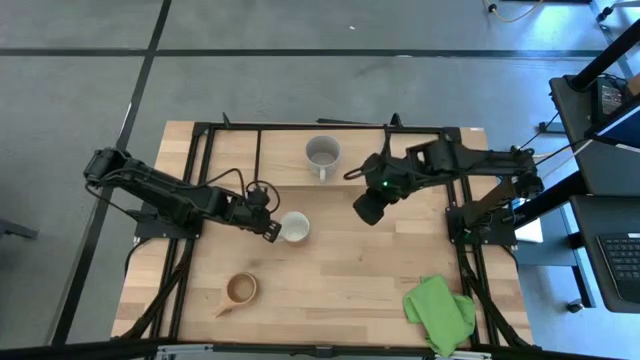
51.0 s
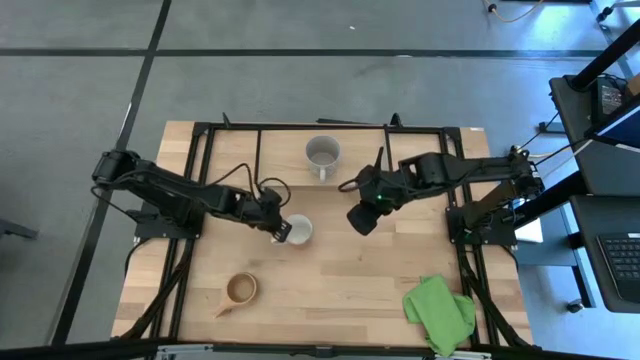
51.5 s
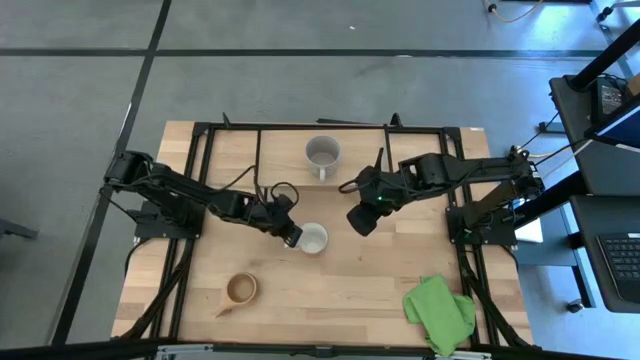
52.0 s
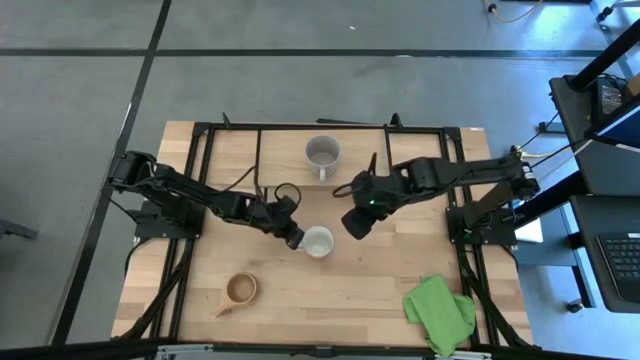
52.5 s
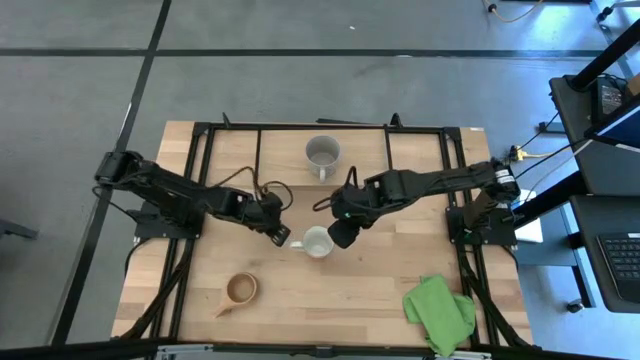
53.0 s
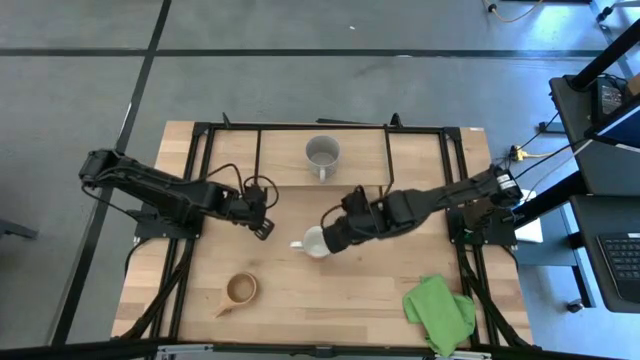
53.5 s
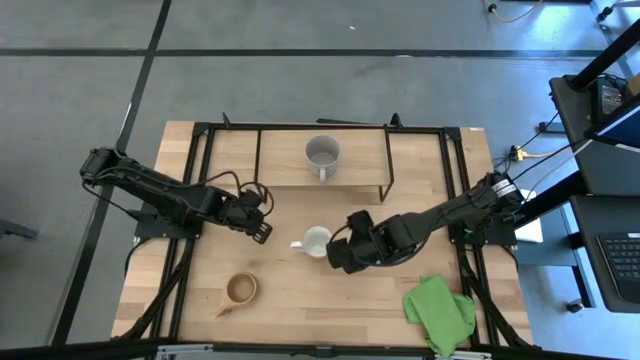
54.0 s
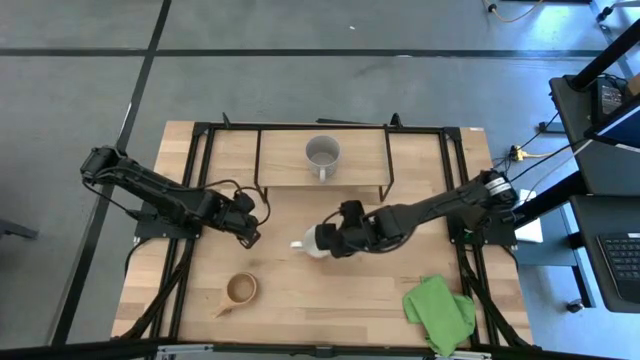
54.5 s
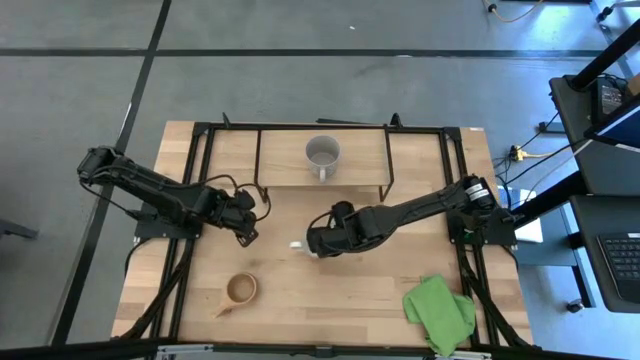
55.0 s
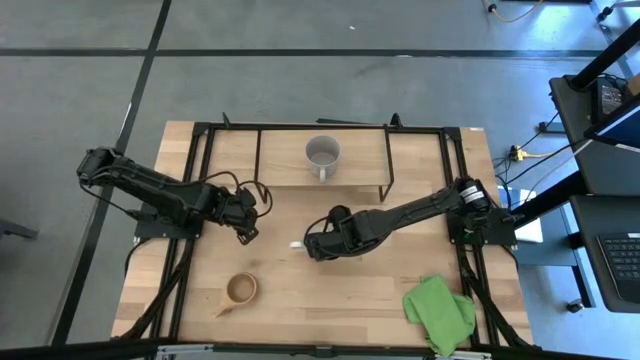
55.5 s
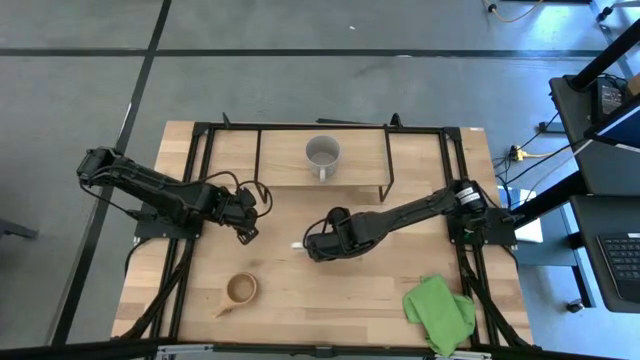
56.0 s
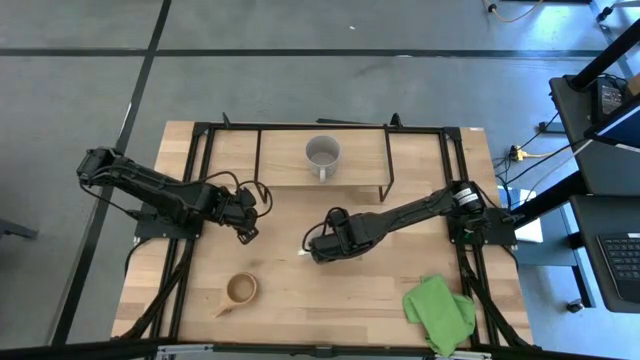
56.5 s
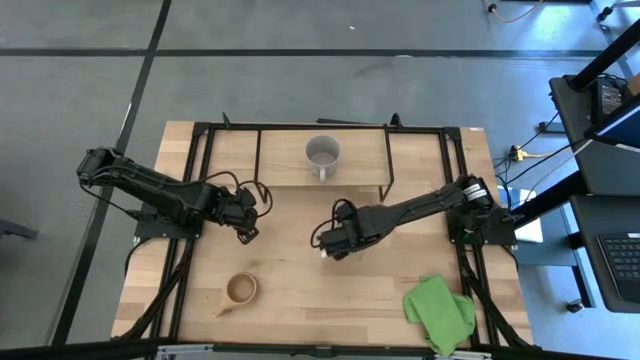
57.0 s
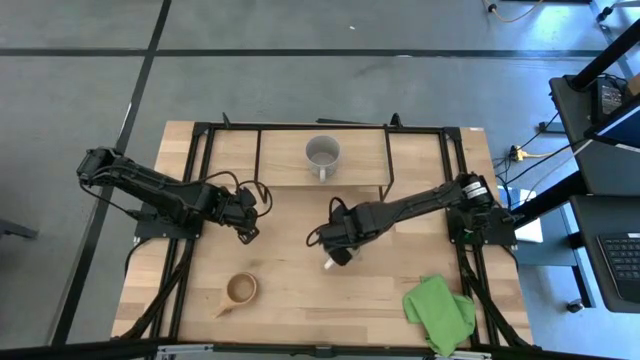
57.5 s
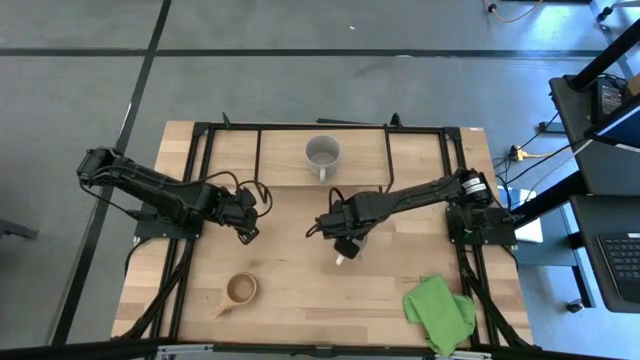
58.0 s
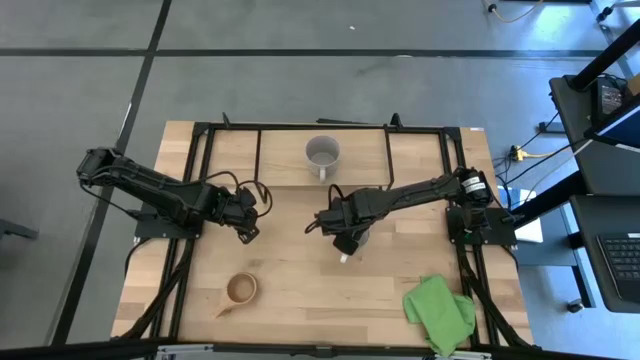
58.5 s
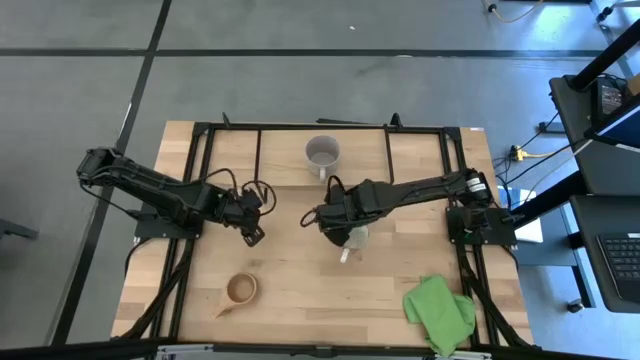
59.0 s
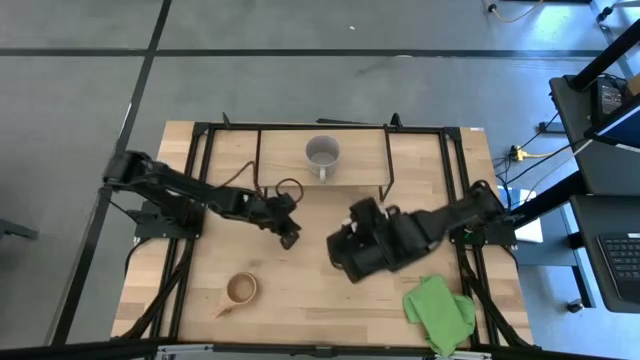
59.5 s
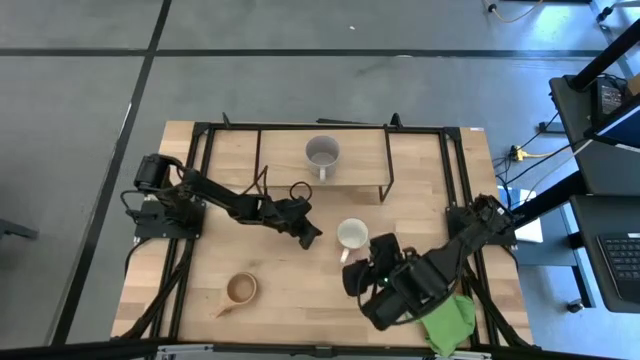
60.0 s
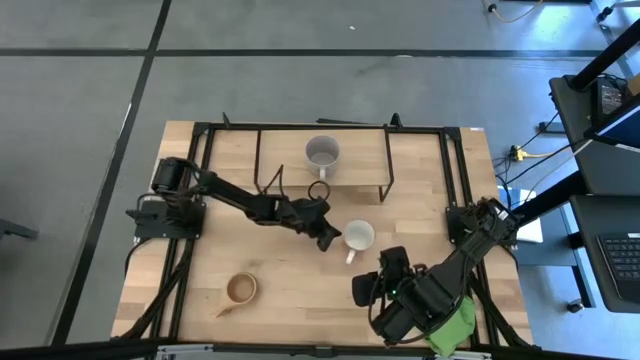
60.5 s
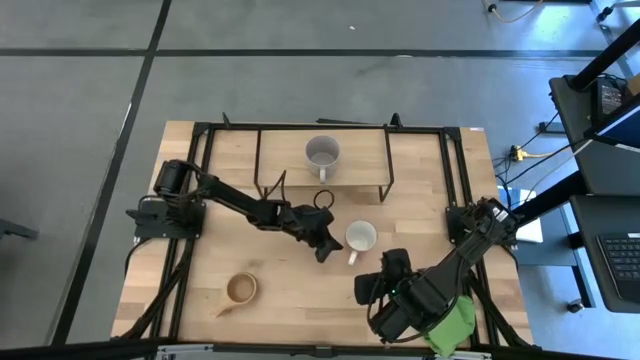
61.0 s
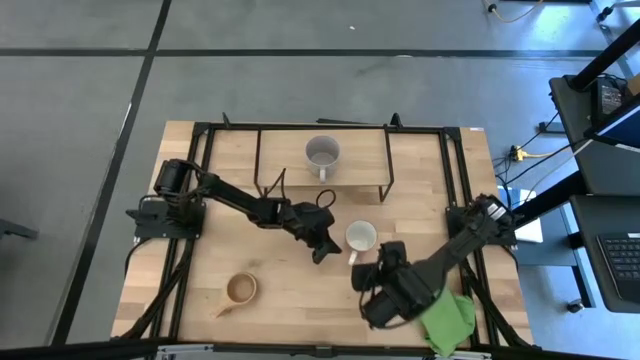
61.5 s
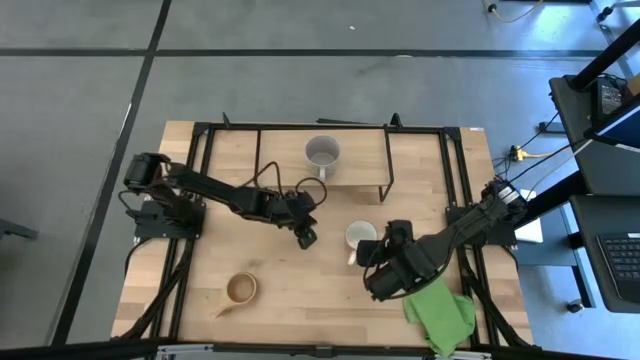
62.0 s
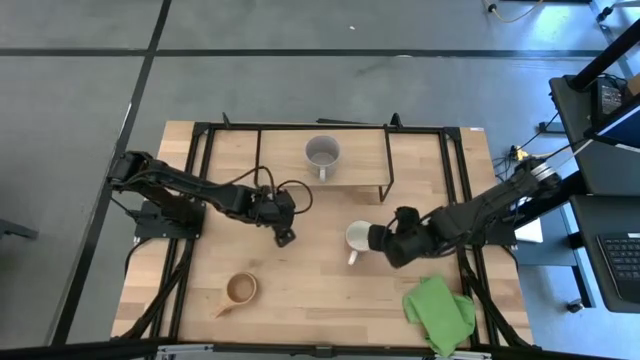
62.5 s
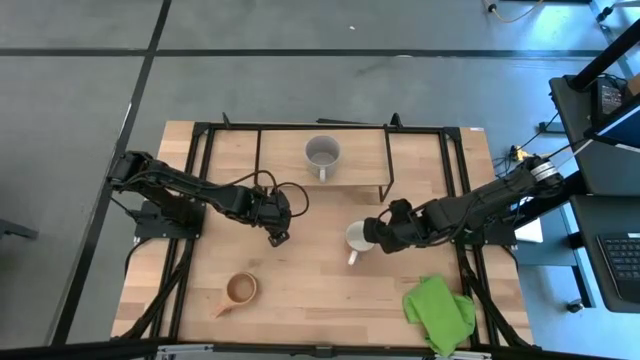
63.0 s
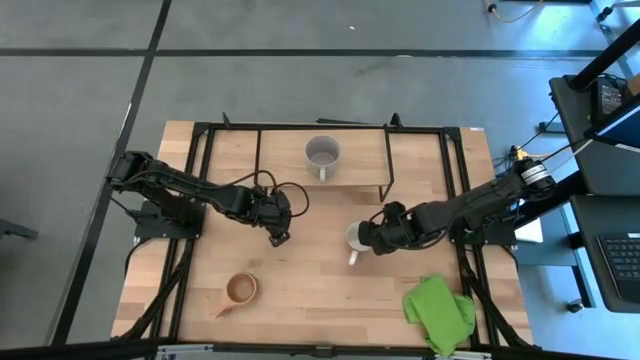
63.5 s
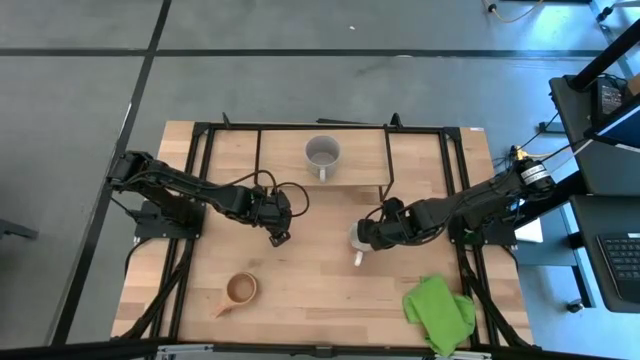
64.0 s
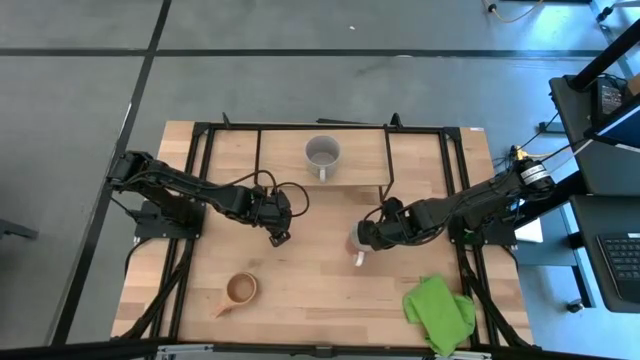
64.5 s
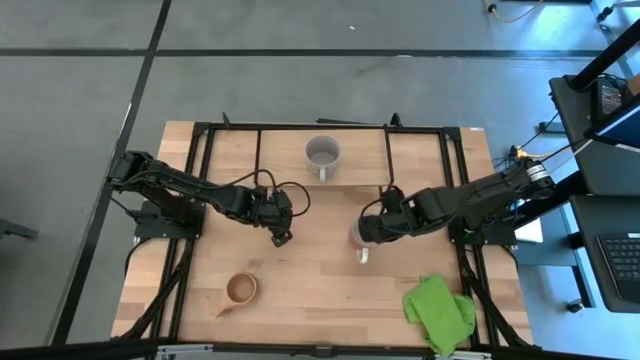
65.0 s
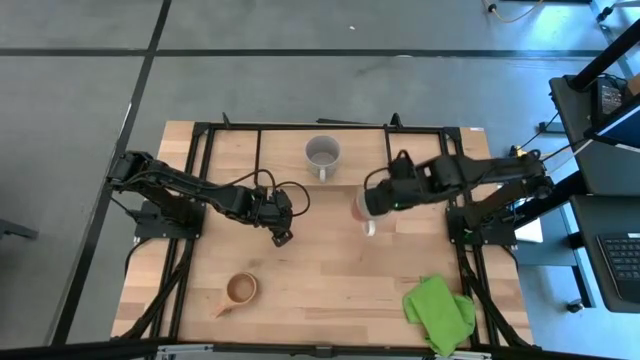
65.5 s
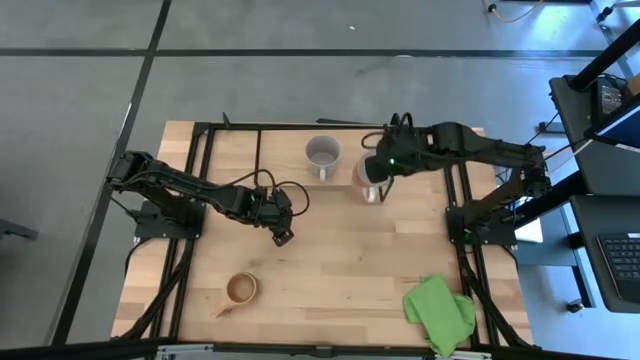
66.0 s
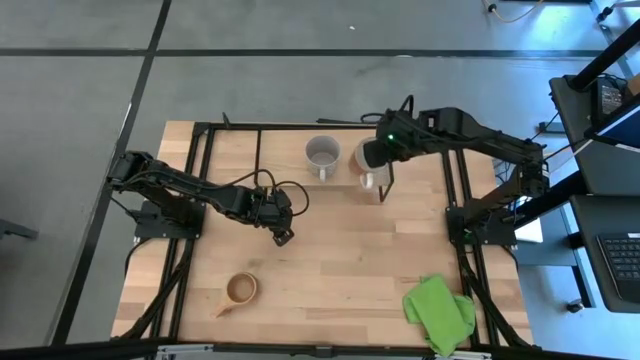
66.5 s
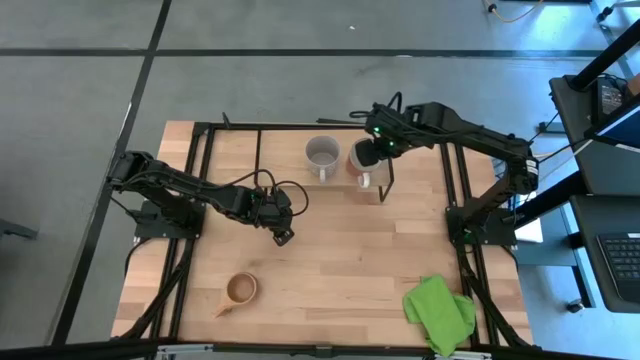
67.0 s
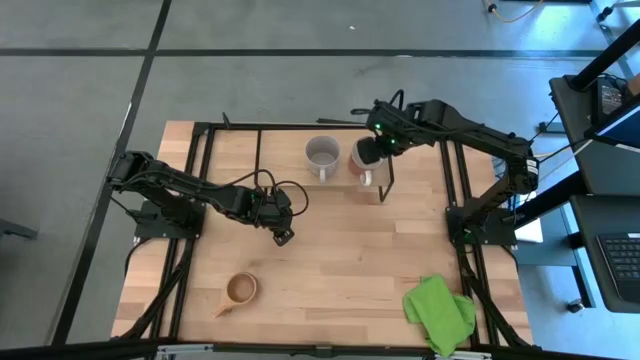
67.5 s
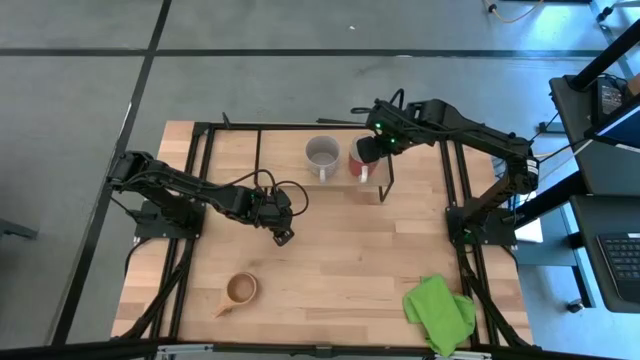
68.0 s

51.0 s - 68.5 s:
Task: Stack small to large cups/mugs on shelf
Put the red mug on the shelf
